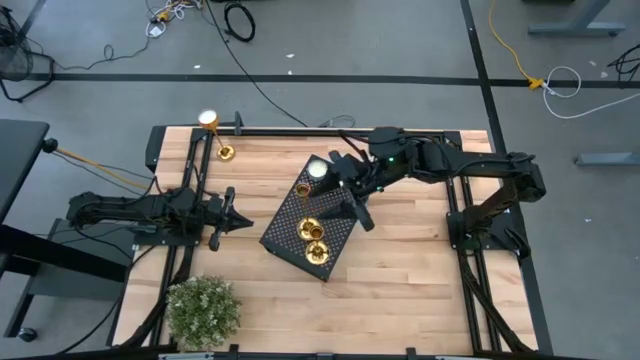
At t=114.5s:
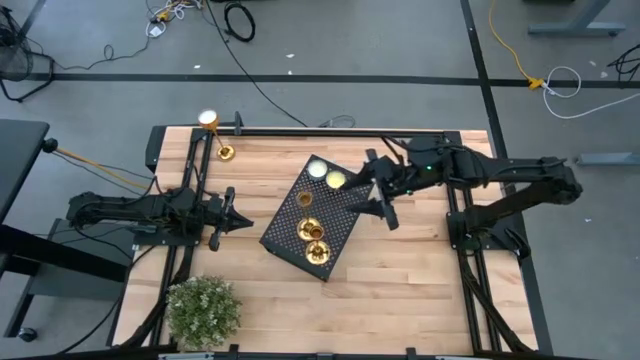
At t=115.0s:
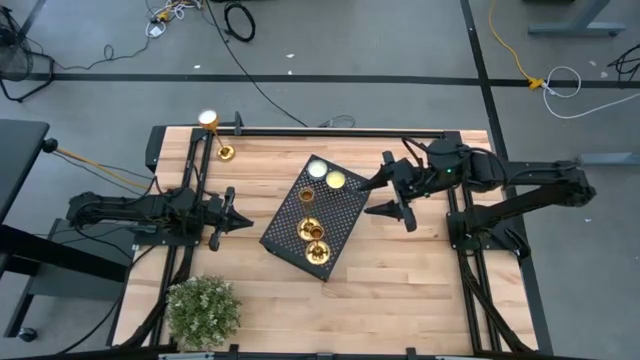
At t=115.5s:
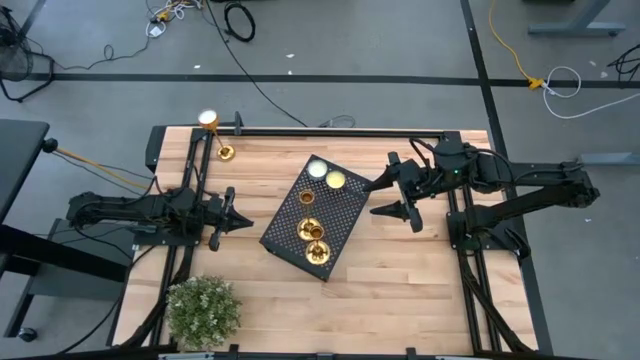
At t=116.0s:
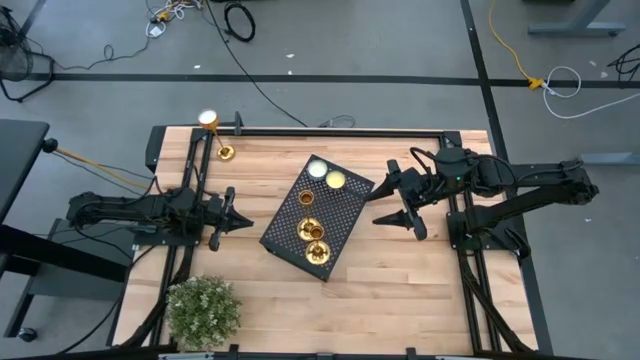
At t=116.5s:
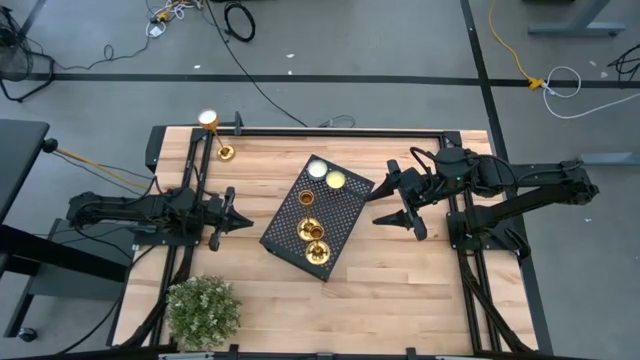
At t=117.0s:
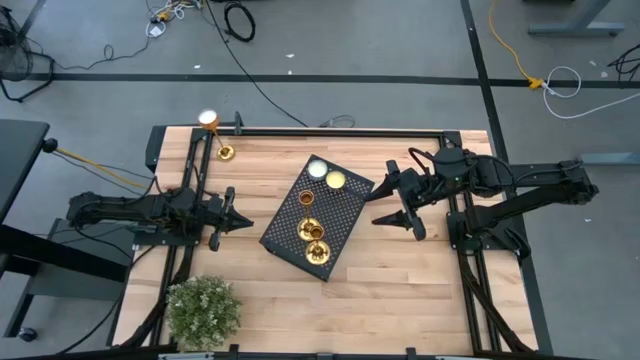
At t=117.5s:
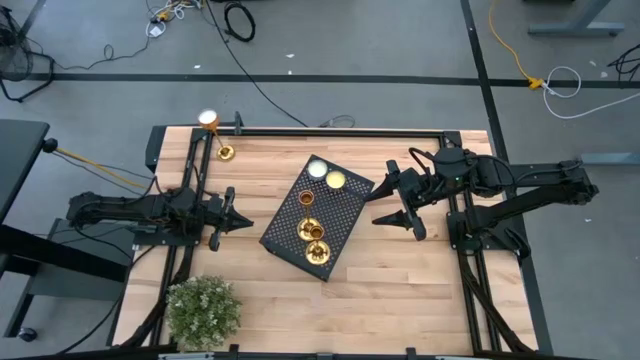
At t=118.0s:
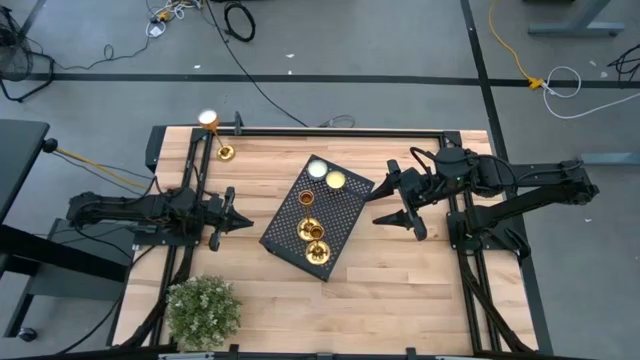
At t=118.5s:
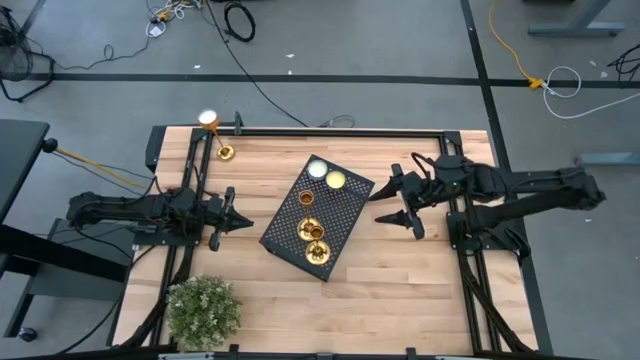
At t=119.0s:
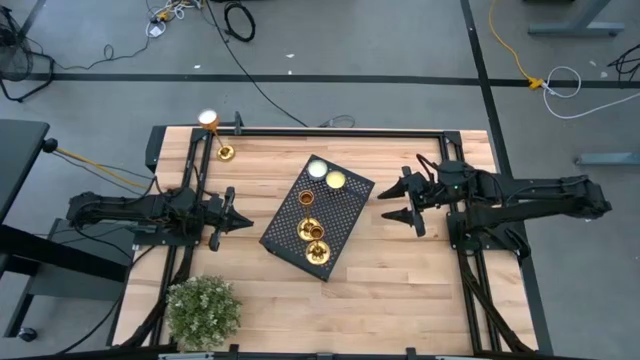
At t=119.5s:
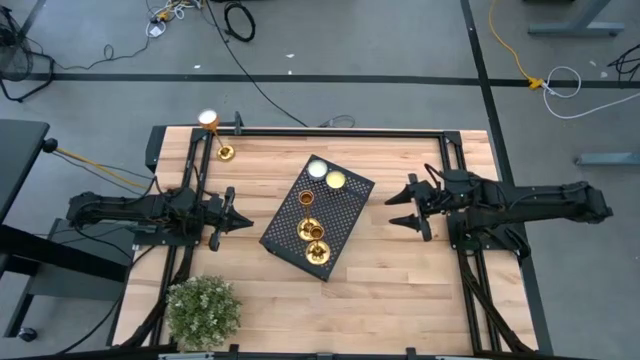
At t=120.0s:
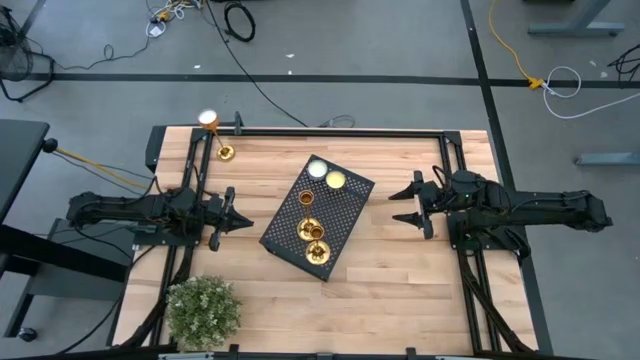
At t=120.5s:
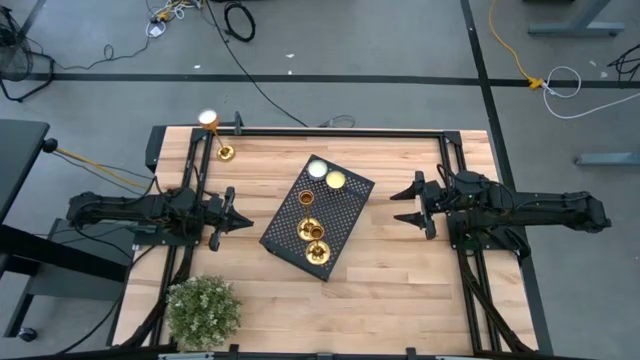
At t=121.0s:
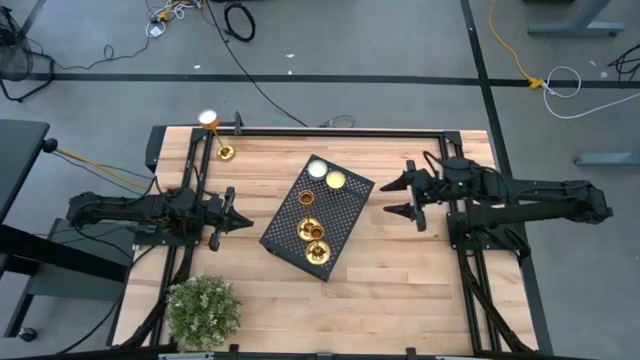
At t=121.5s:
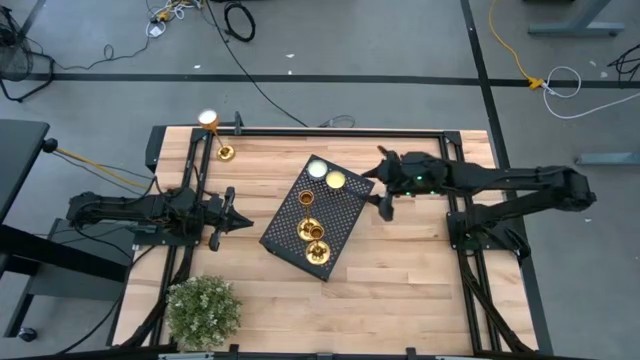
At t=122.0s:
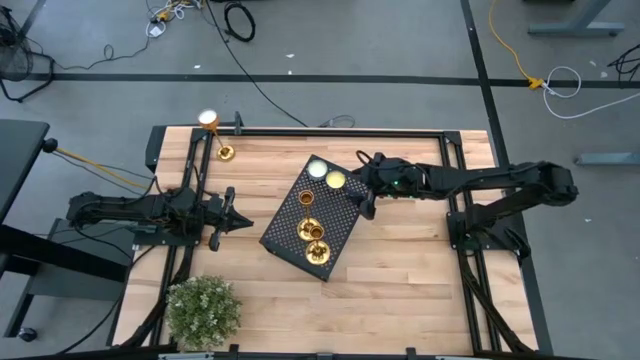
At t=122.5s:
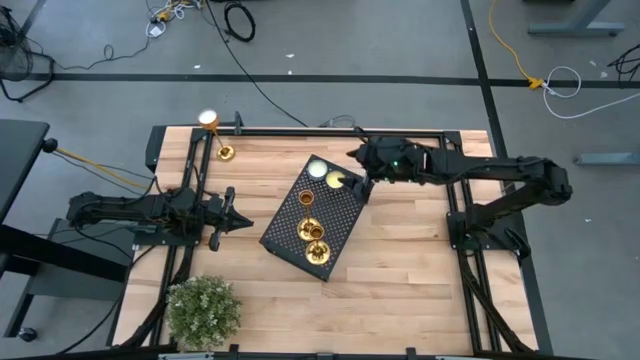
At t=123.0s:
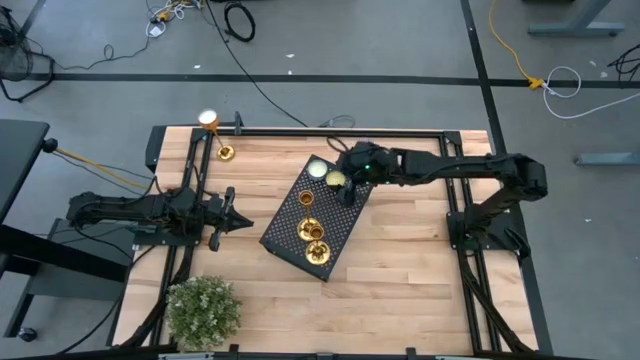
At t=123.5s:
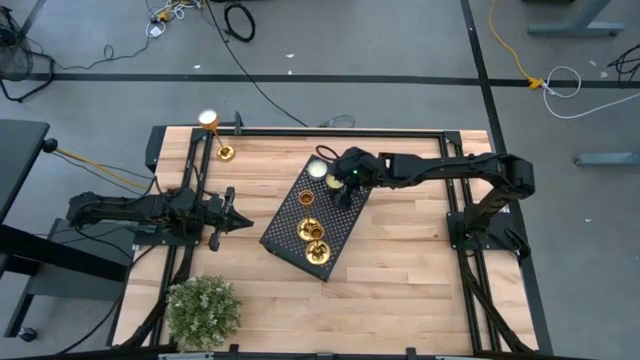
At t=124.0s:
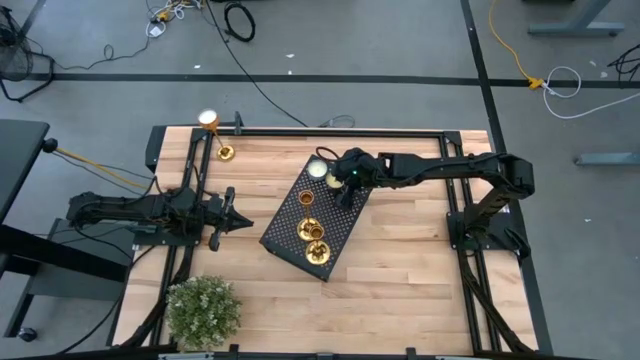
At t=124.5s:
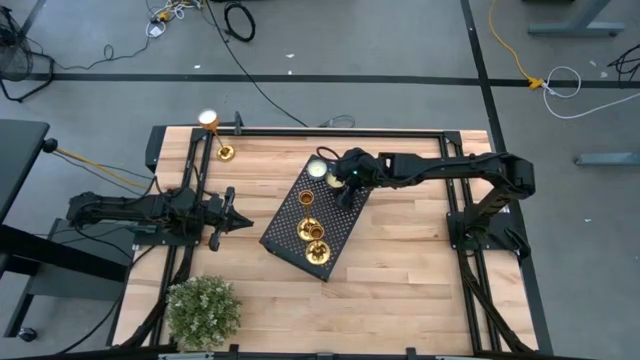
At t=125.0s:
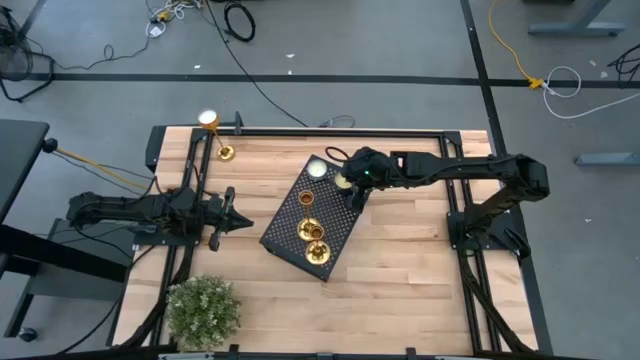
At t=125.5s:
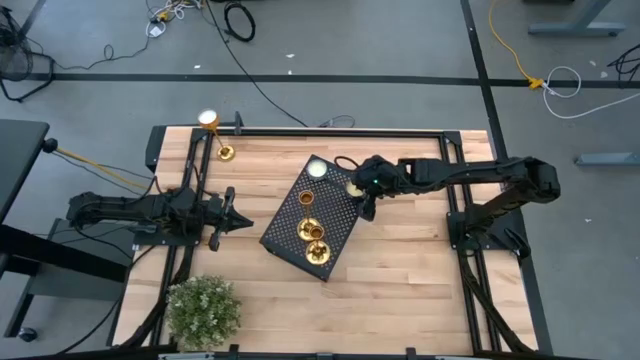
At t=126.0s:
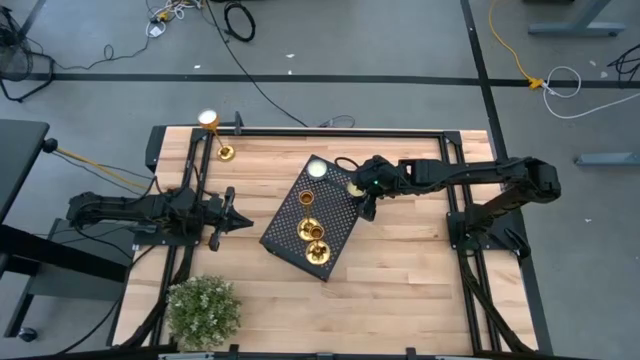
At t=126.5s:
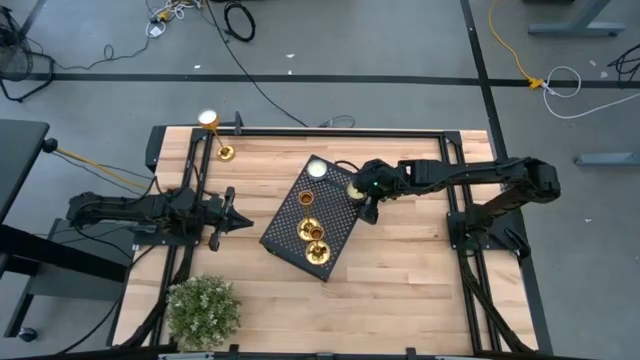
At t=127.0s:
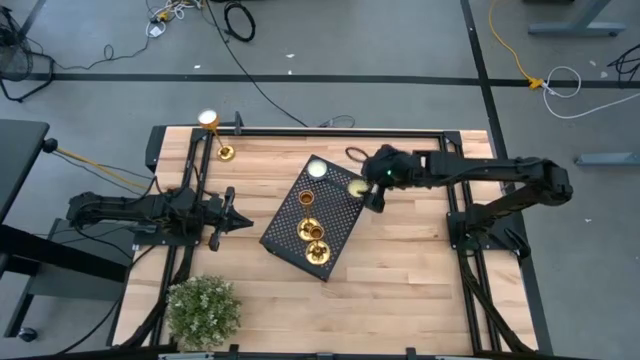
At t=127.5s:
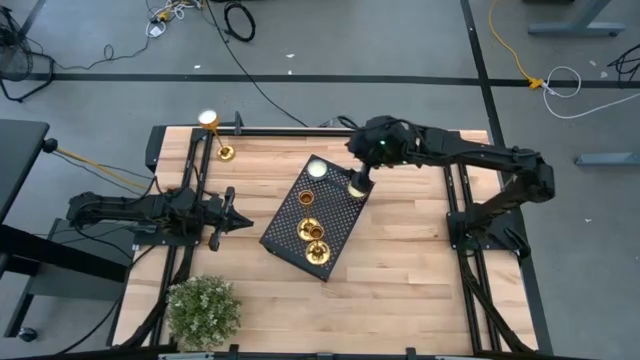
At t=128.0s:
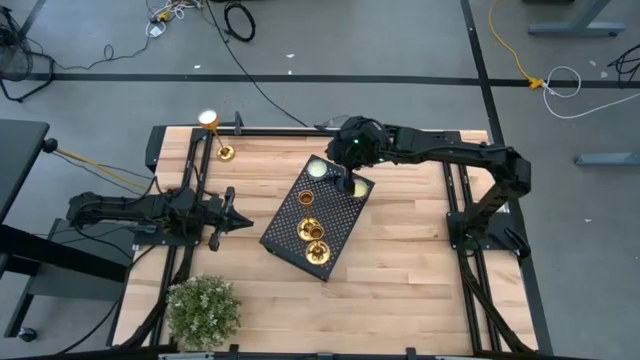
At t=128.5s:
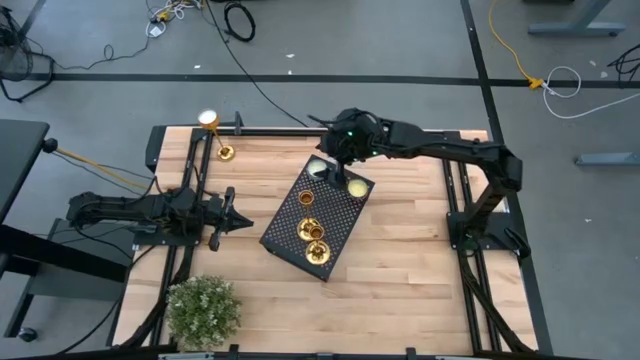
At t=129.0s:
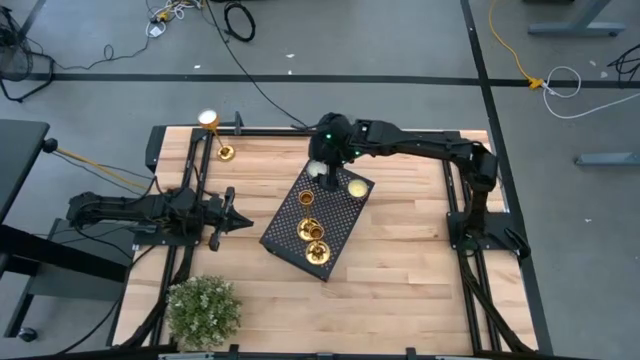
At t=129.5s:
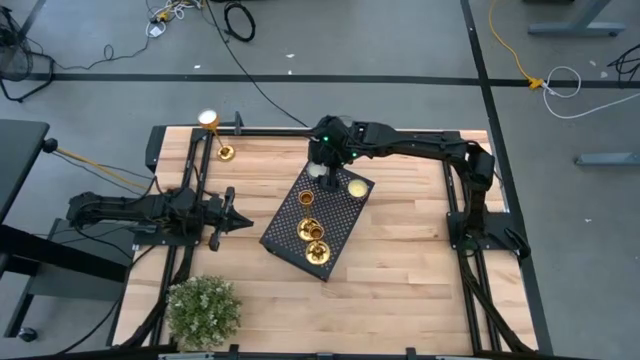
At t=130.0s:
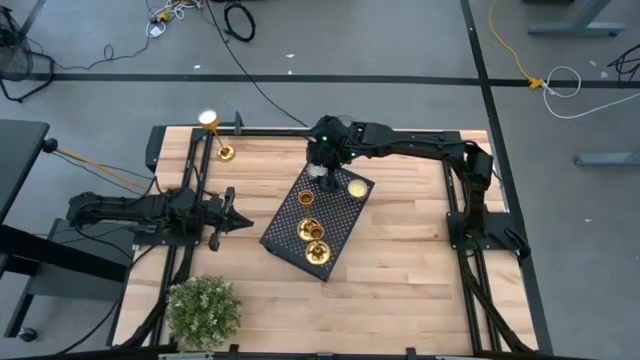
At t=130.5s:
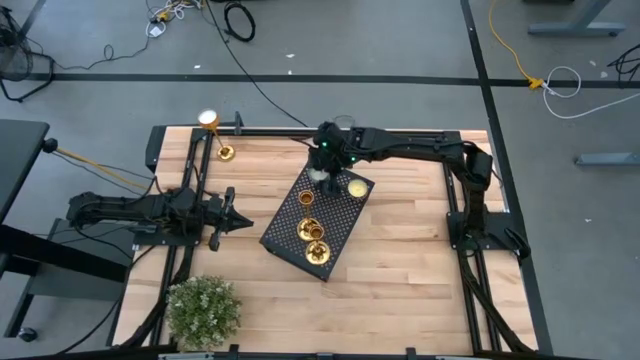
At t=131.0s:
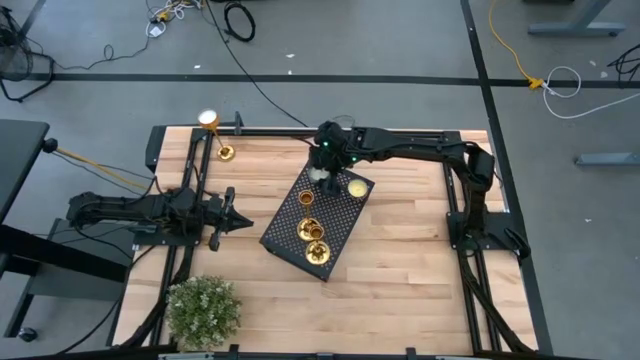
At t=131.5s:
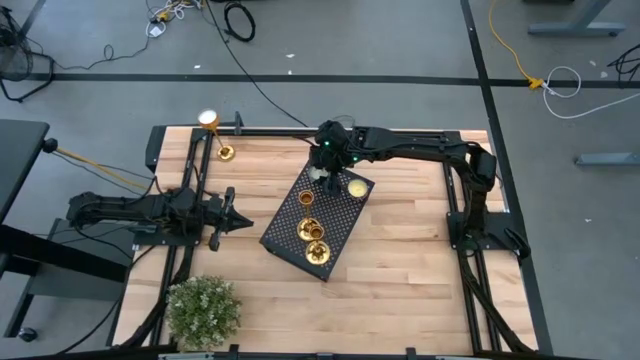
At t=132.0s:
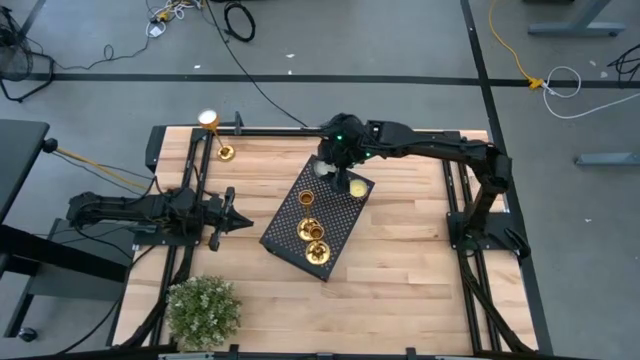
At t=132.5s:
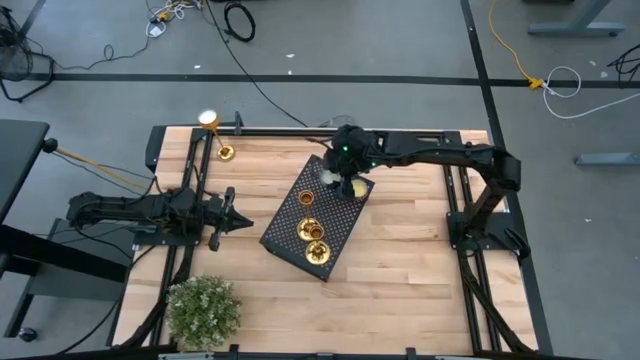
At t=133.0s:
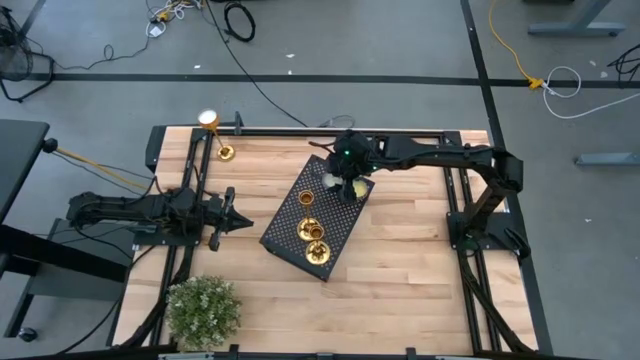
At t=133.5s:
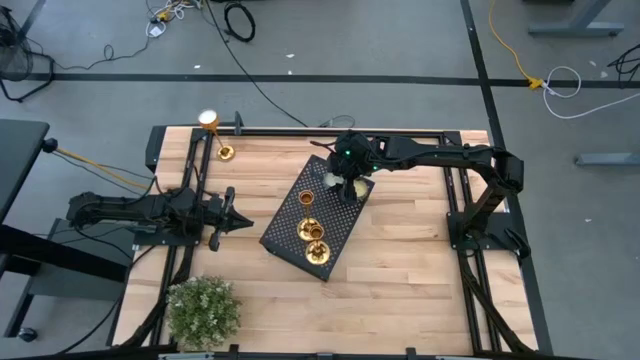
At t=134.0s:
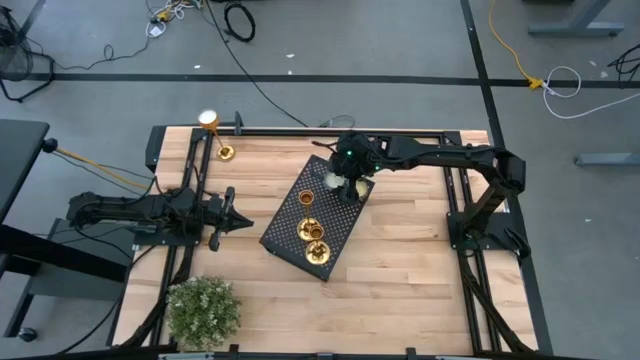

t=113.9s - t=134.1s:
Task: Stock candles on shelf
Adjust the scented candles on the shelf

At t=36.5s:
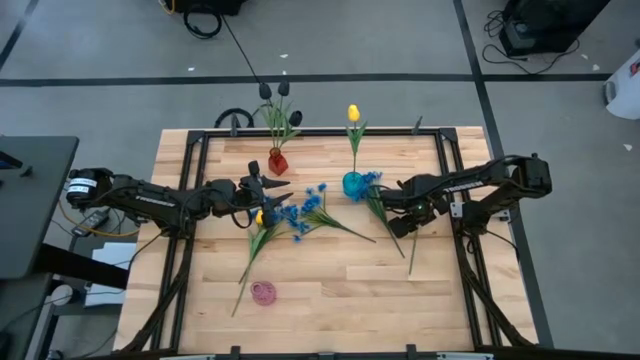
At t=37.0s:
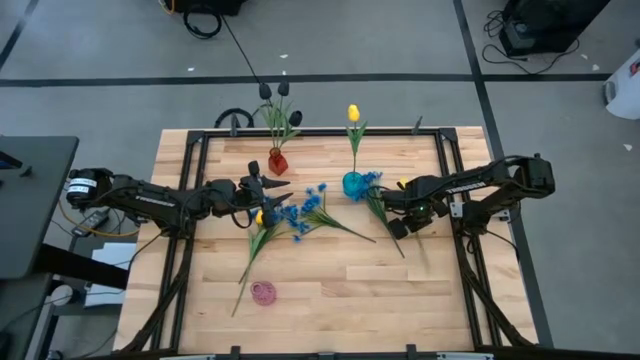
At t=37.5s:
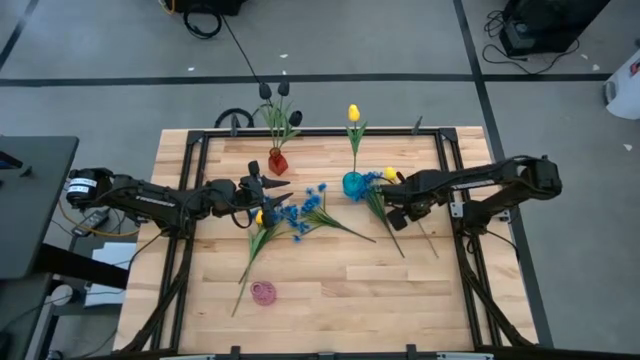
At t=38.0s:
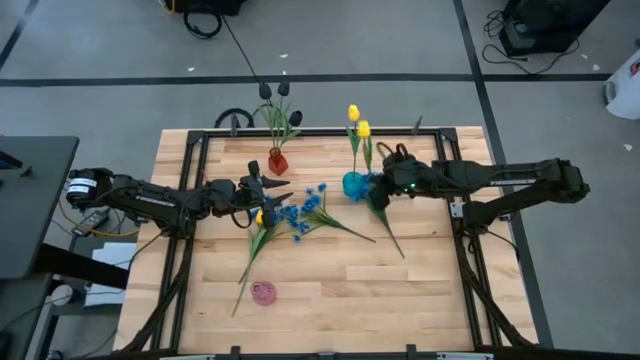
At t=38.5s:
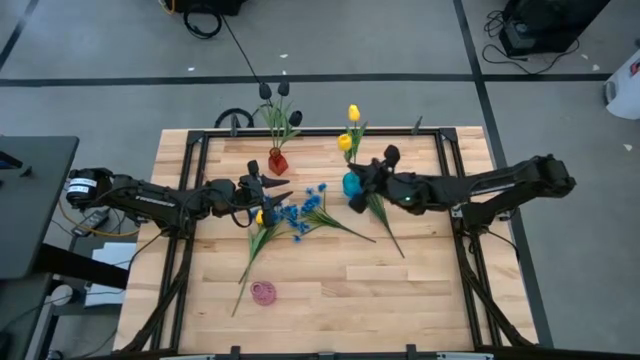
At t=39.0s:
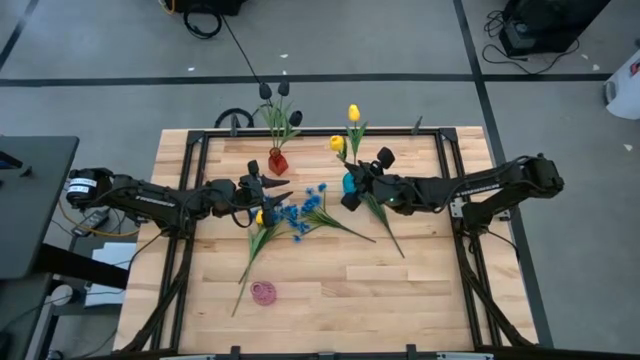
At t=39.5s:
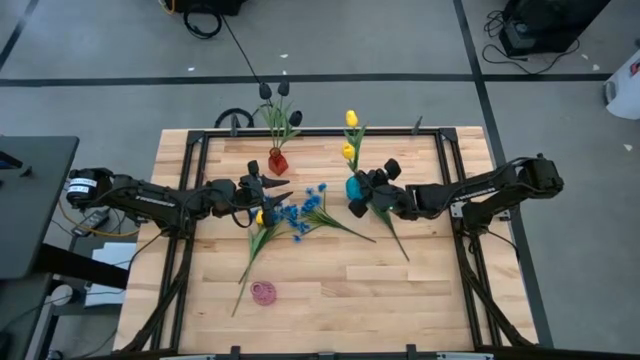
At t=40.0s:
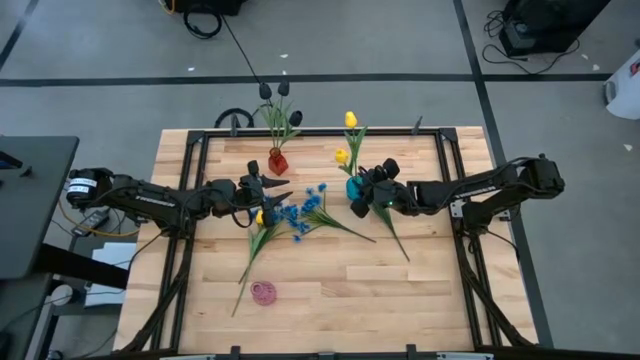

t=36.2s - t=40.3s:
Task: Sort flowers into vase by color
Put the yellow tulip into the blue vase
